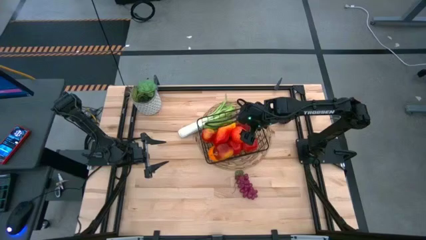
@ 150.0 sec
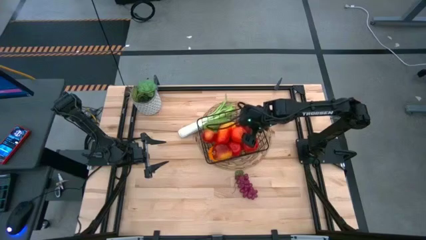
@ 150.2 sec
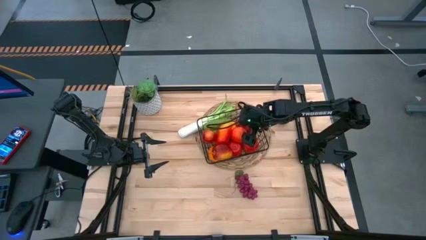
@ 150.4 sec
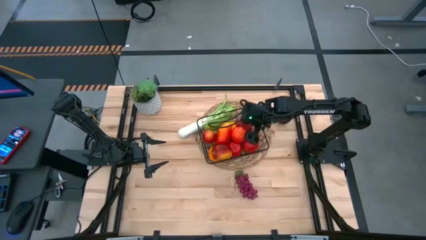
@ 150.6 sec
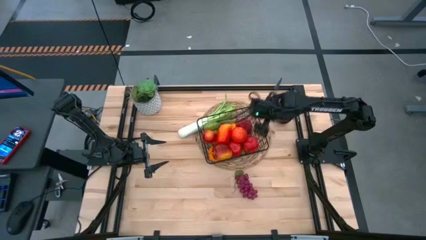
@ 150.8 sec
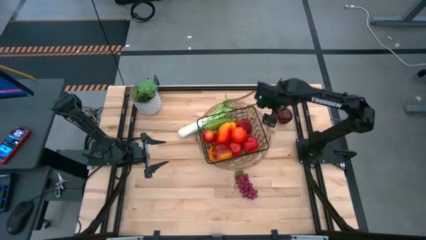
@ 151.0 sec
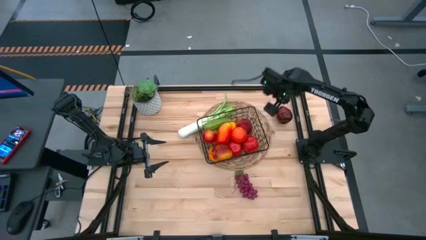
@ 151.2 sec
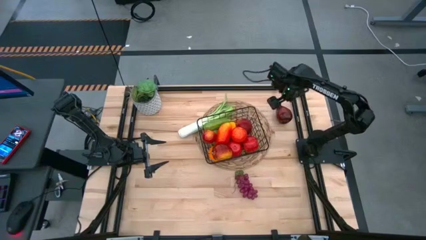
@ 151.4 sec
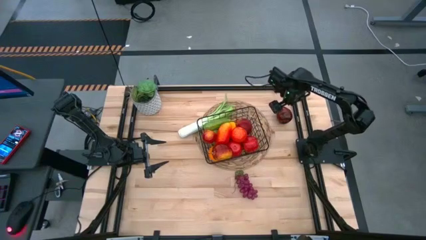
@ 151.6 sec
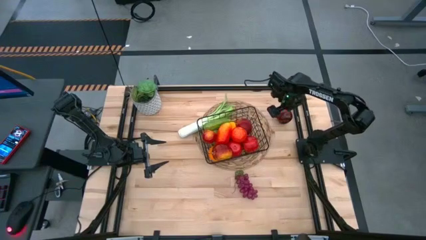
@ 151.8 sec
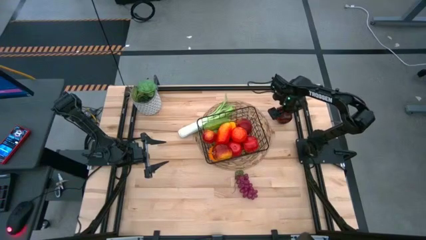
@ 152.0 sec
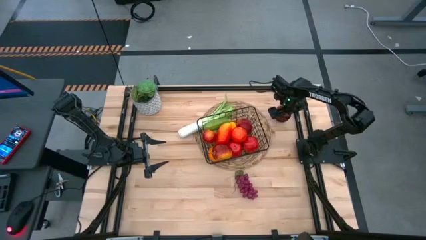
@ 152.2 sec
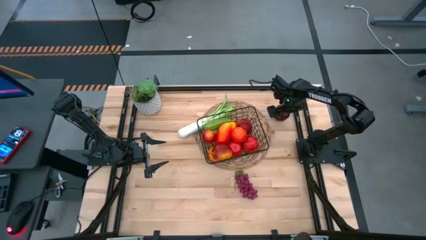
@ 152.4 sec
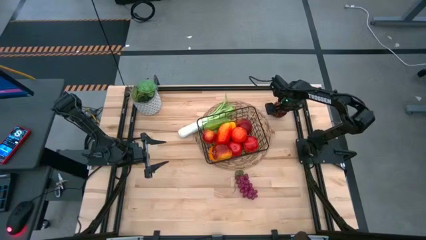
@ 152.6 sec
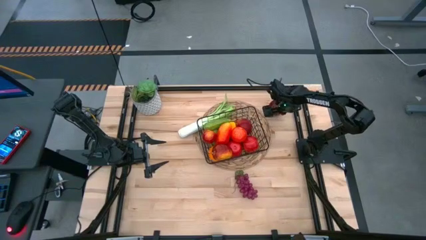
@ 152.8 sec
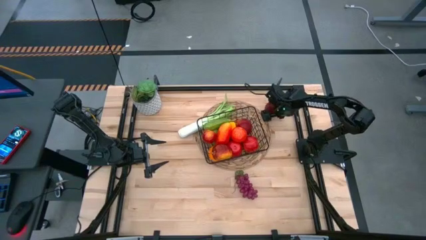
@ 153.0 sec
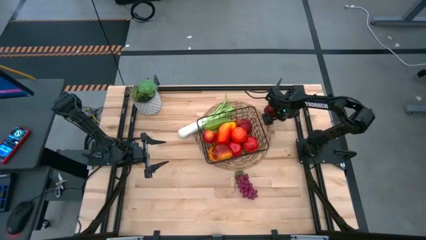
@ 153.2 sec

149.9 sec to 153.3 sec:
Task: Build produce basket
Put the apple into the wire basket

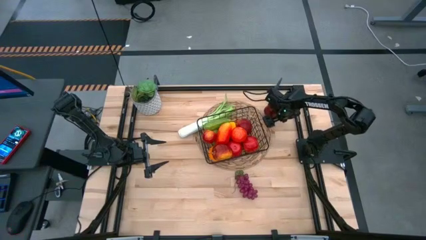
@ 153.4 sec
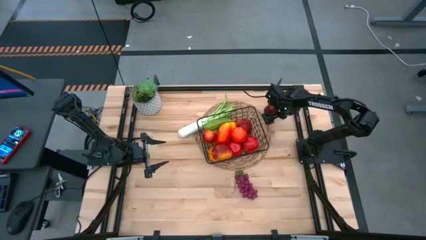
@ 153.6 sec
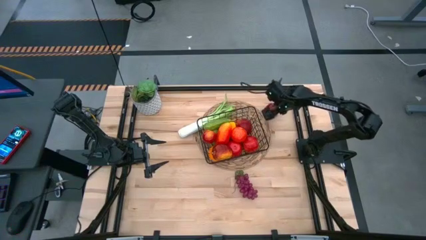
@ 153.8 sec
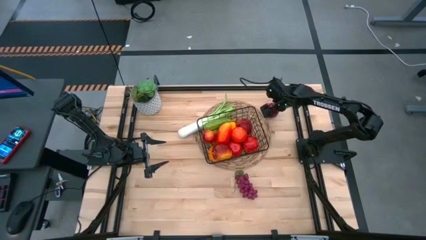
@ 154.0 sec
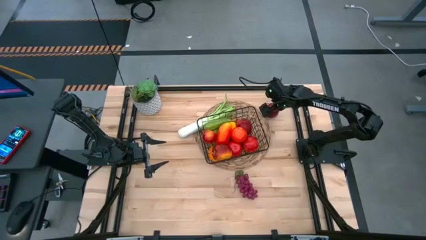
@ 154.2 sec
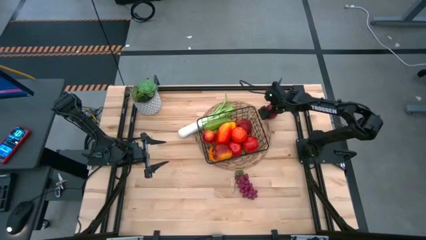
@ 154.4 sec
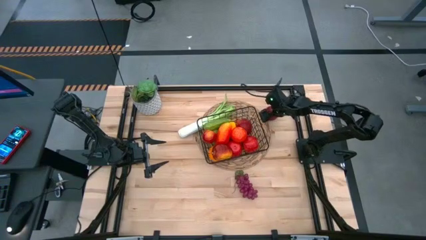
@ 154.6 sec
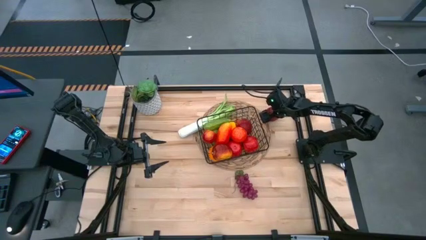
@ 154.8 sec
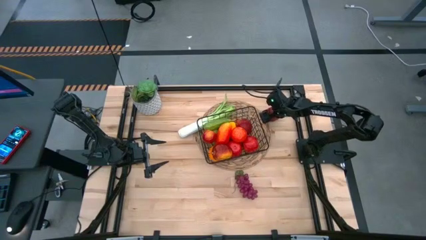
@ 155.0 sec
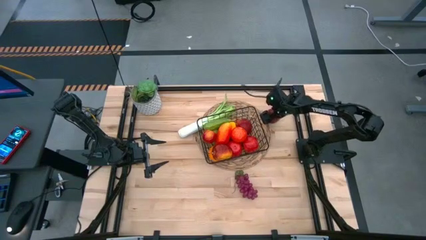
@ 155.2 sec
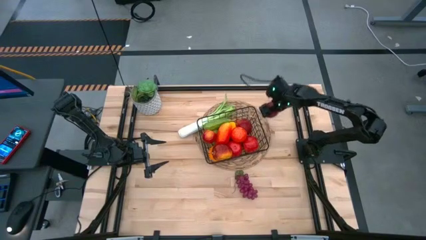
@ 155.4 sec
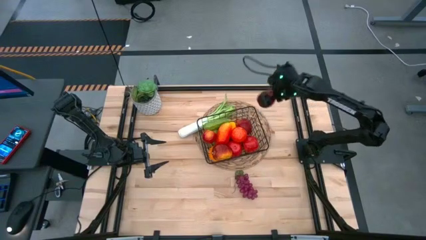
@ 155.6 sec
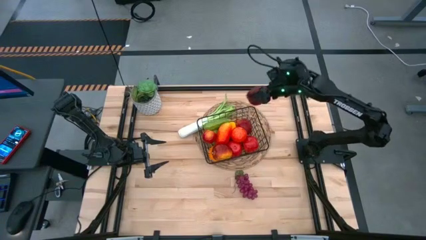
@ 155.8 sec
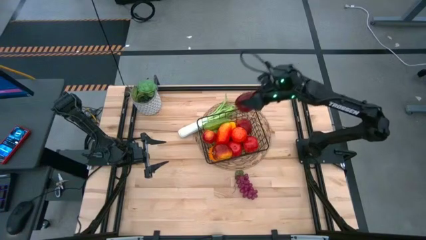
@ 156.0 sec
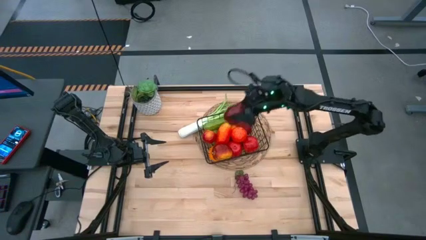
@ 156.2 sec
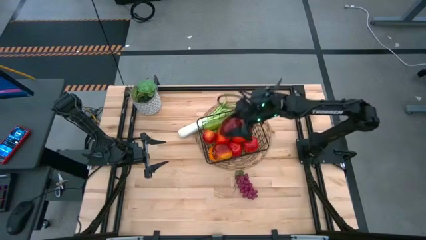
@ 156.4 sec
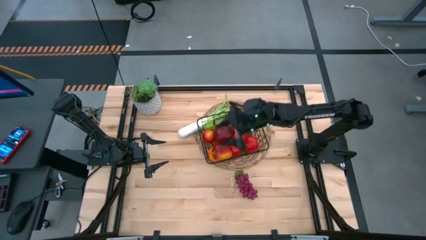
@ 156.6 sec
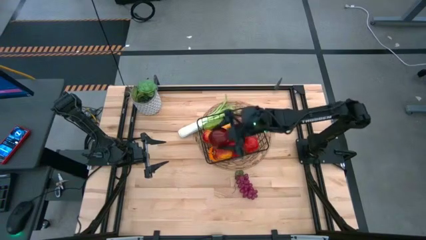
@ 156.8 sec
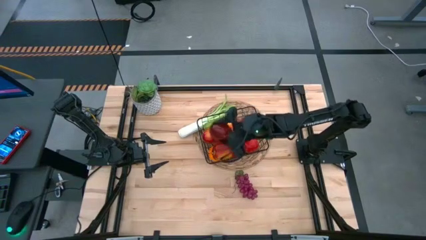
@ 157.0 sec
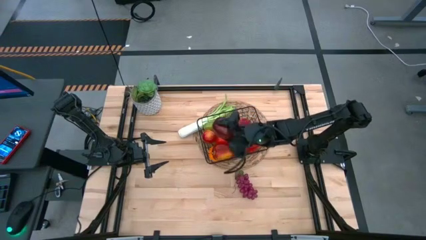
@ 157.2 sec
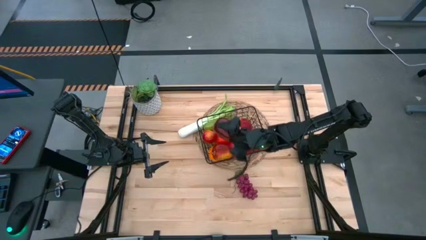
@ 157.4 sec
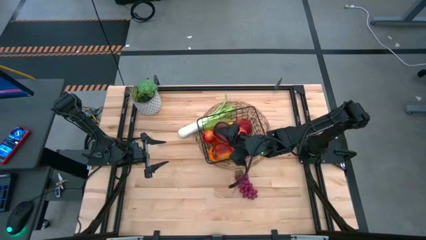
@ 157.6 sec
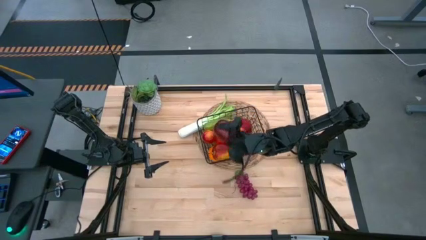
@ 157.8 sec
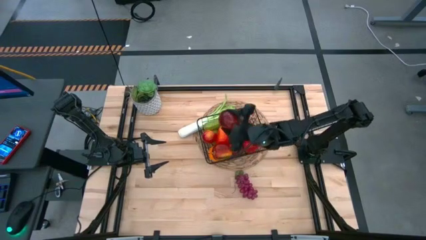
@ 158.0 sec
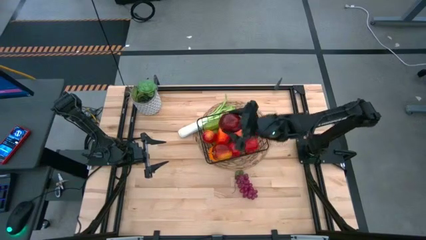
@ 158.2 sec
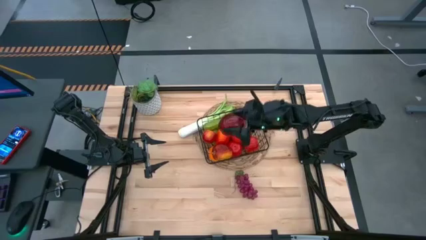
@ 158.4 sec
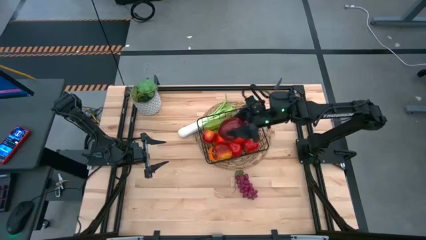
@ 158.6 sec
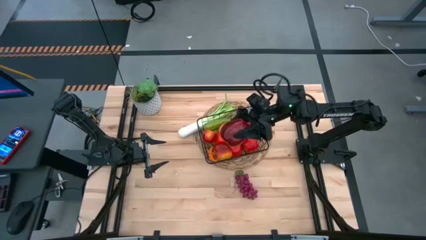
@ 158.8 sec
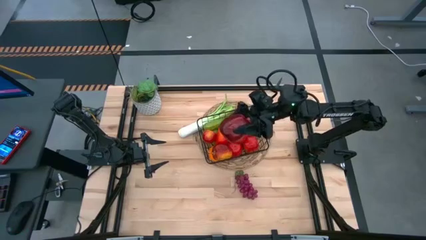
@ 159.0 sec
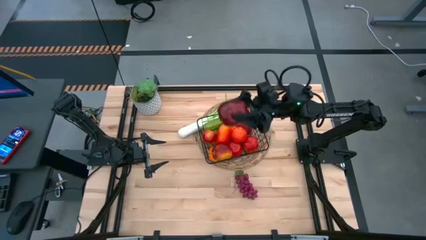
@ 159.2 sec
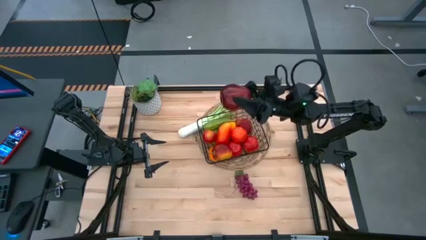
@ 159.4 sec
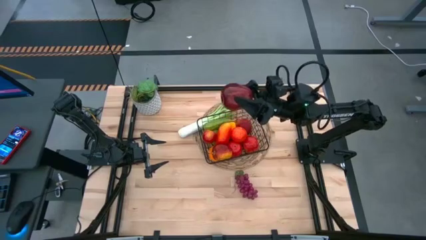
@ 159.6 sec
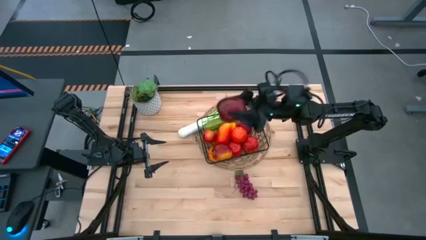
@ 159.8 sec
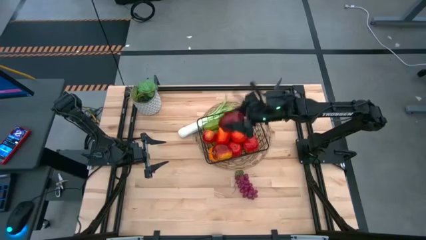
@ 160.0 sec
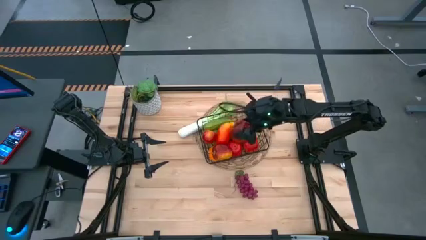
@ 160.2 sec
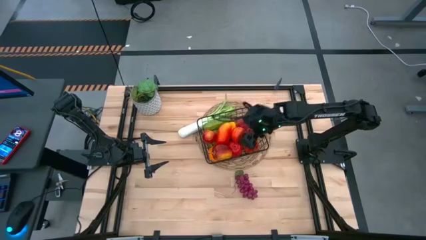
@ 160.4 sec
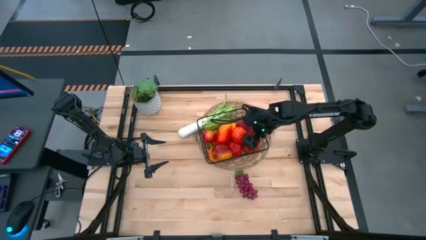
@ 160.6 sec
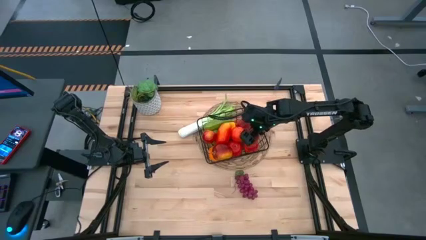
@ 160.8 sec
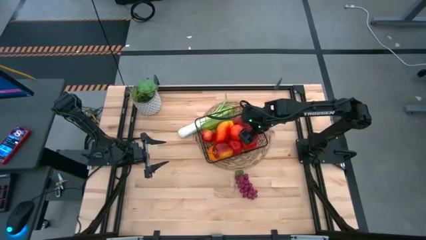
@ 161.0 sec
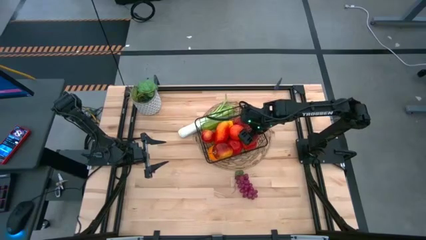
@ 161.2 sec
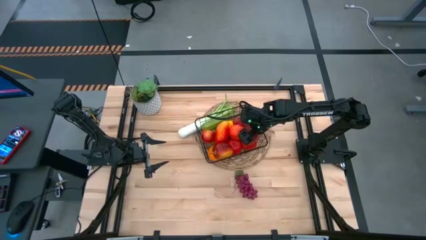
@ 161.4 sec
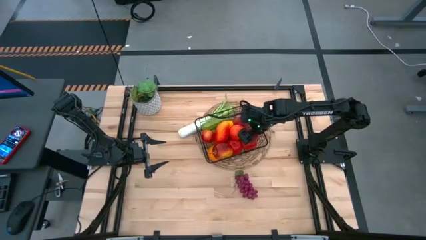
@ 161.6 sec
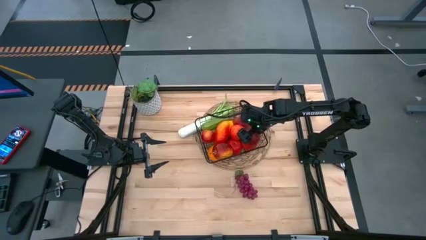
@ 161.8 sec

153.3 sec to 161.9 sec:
Put the apple into the wire basket

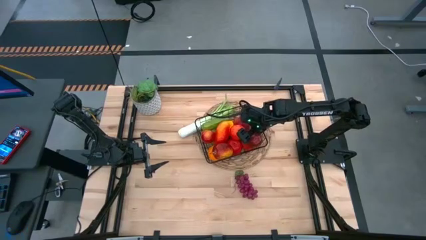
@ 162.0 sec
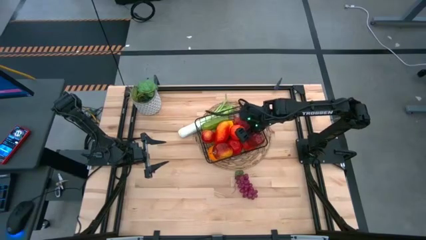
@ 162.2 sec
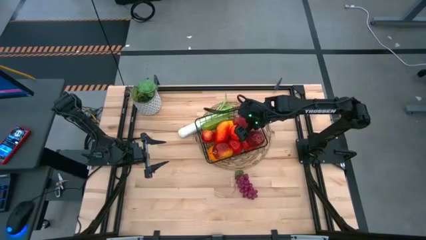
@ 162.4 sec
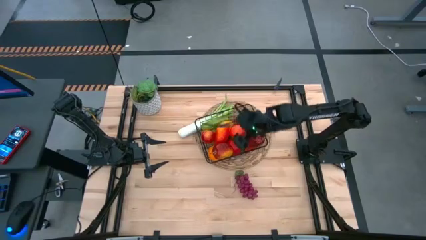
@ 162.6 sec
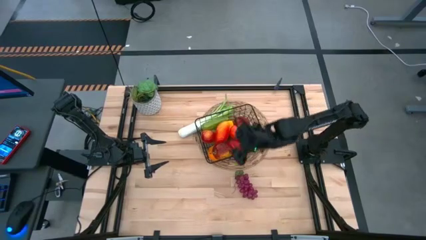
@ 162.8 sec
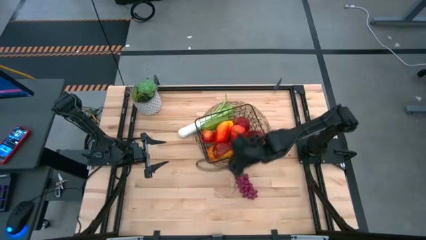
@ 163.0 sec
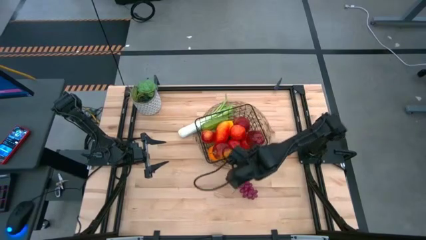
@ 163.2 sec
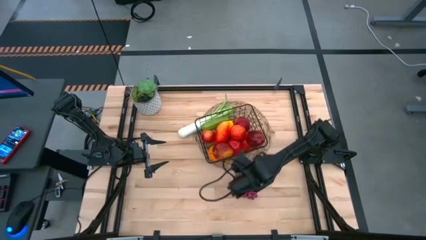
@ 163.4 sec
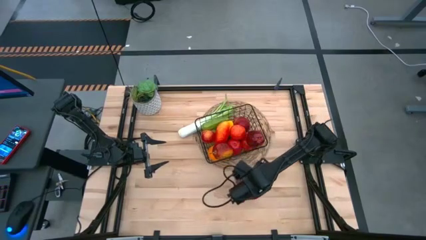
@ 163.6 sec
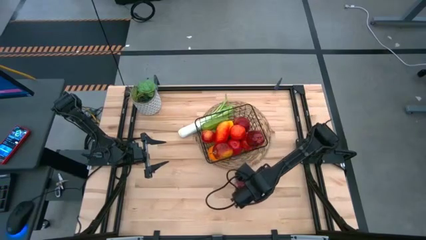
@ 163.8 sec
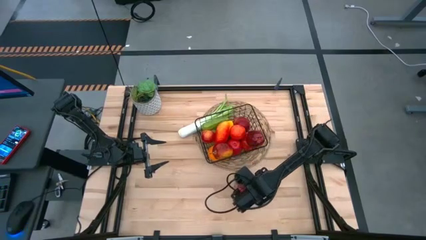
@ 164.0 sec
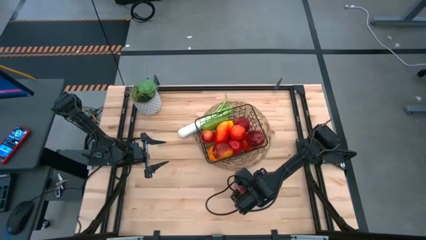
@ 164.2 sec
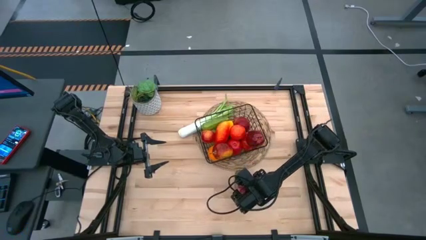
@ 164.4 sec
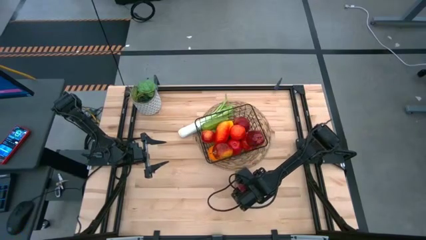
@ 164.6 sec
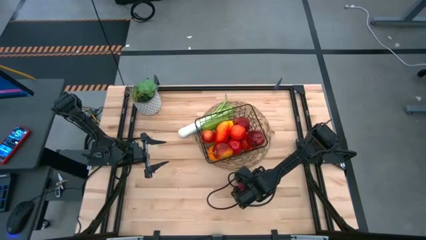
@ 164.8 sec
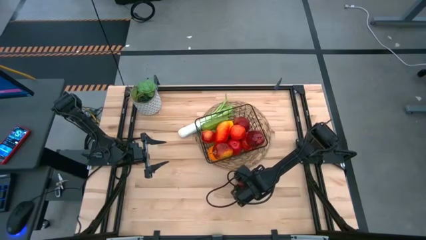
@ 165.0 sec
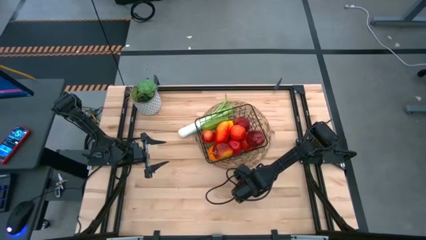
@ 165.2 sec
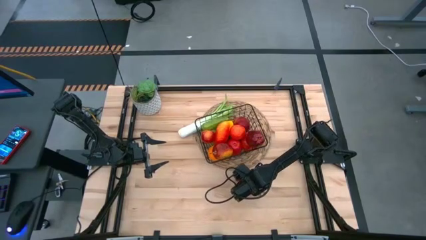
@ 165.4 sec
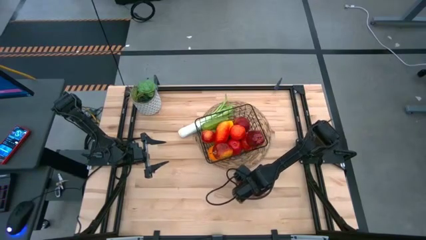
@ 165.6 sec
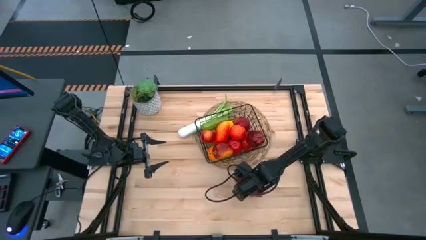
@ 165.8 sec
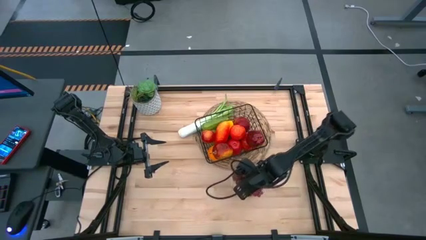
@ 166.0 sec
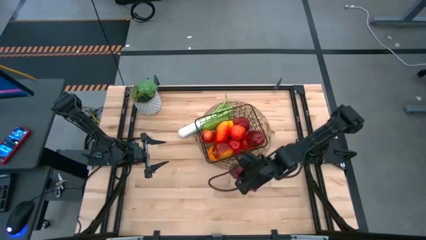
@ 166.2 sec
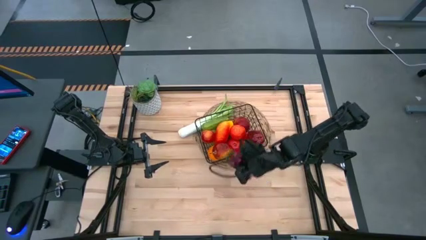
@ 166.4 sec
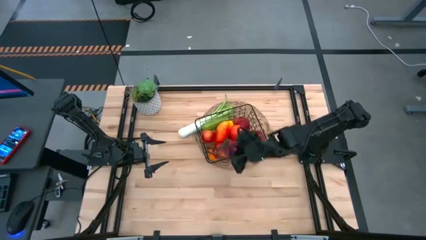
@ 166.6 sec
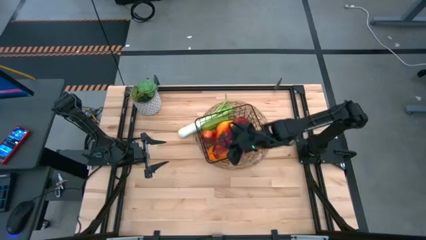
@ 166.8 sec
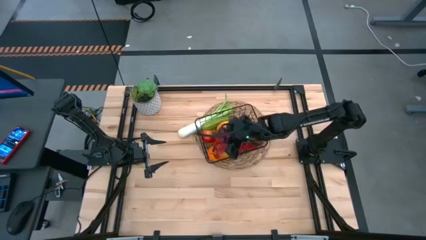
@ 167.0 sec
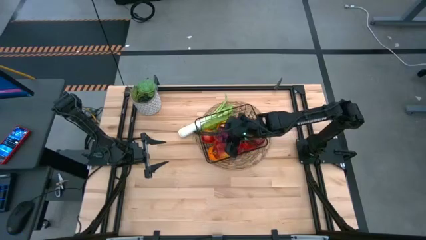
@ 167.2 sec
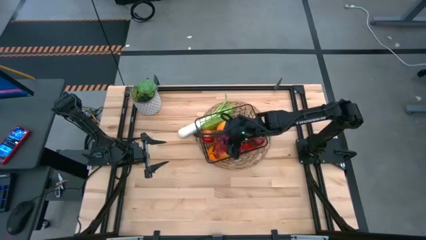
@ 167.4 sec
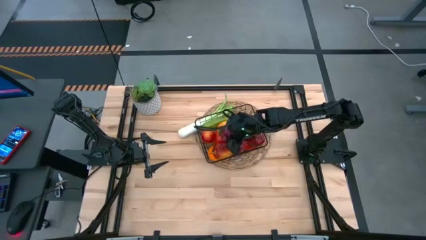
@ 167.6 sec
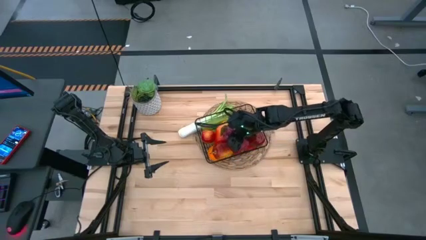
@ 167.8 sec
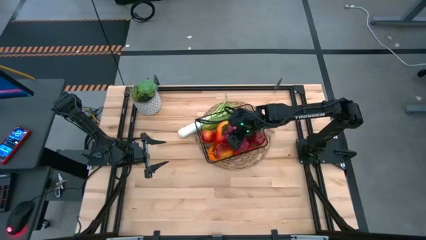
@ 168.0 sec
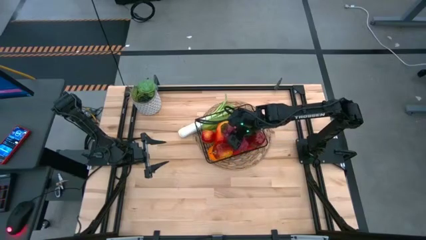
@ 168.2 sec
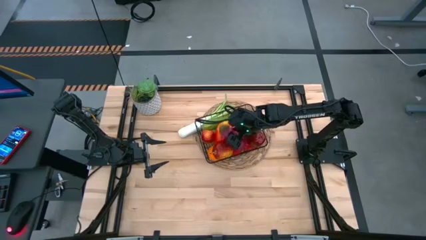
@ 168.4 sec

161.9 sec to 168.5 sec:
Put the grapes into the wire basket
